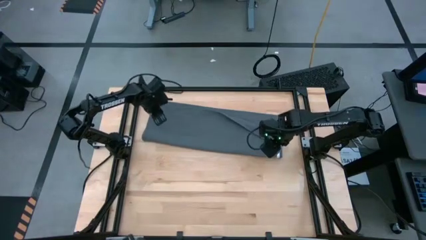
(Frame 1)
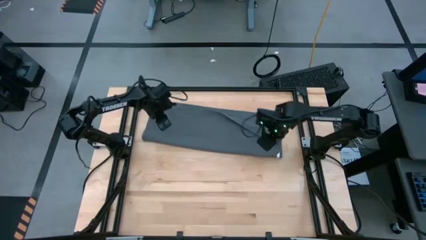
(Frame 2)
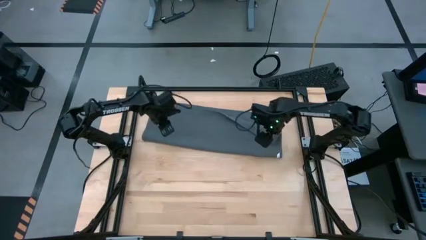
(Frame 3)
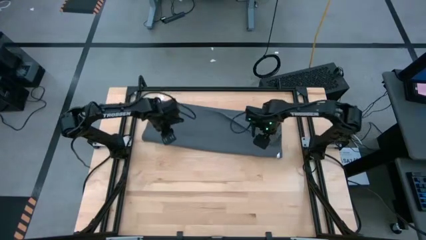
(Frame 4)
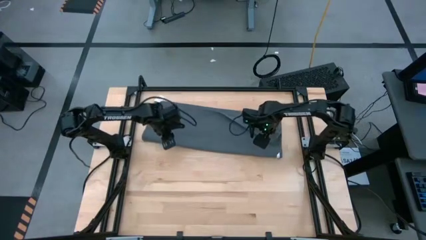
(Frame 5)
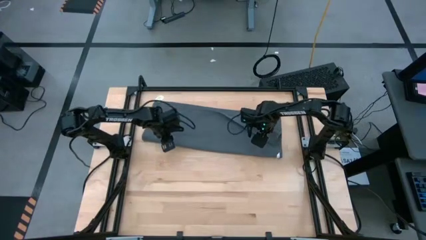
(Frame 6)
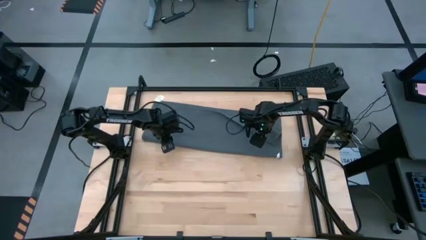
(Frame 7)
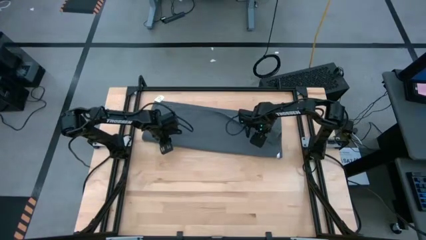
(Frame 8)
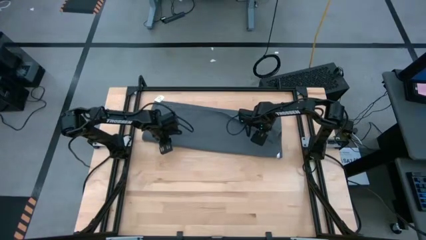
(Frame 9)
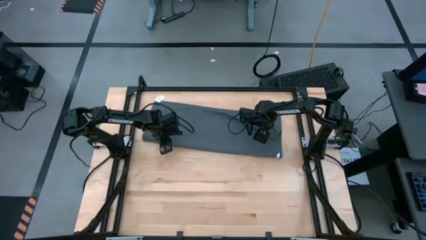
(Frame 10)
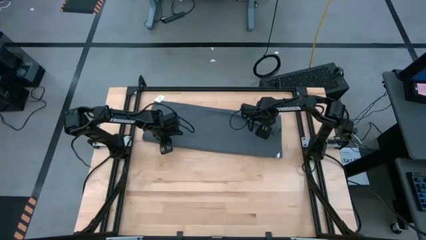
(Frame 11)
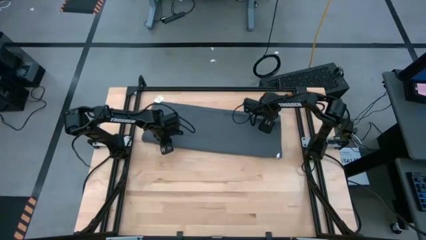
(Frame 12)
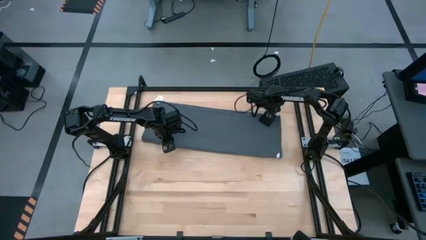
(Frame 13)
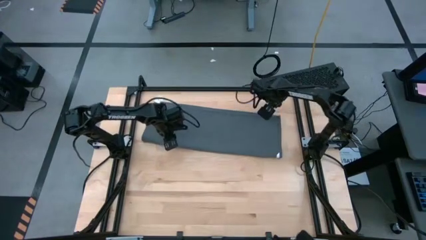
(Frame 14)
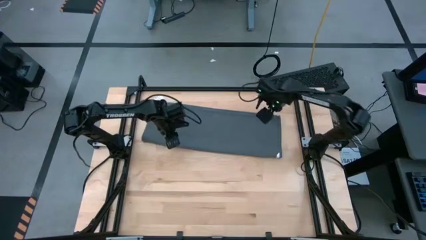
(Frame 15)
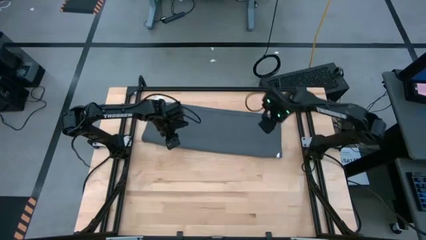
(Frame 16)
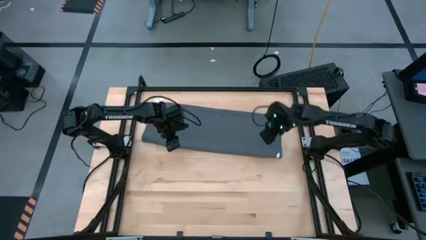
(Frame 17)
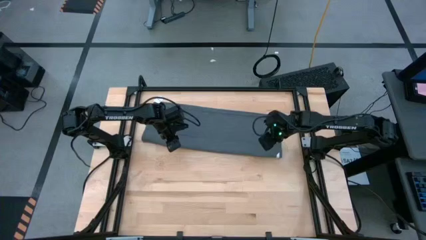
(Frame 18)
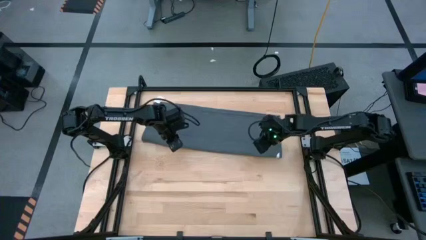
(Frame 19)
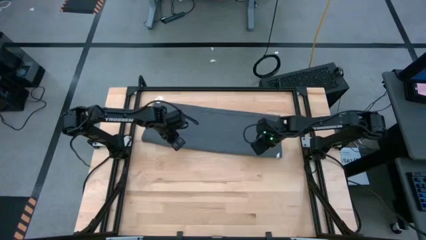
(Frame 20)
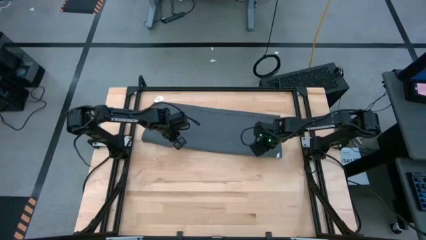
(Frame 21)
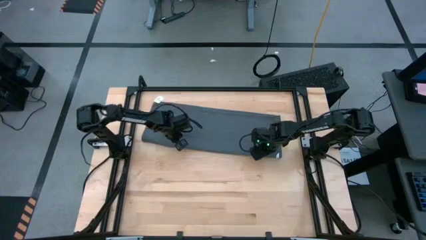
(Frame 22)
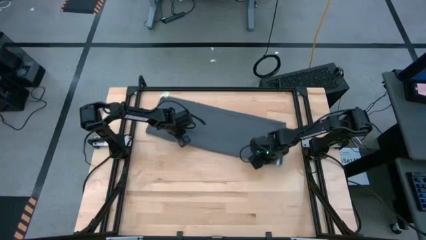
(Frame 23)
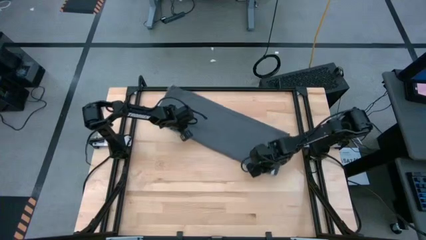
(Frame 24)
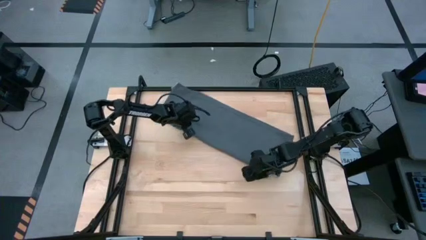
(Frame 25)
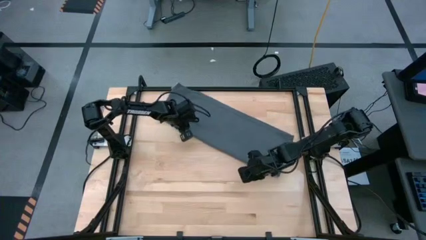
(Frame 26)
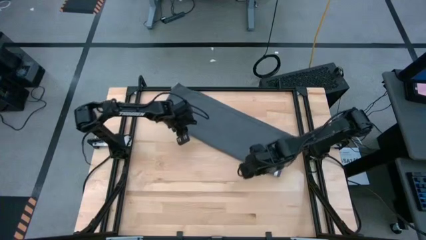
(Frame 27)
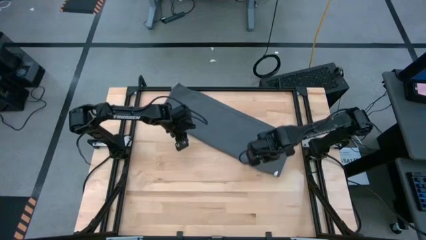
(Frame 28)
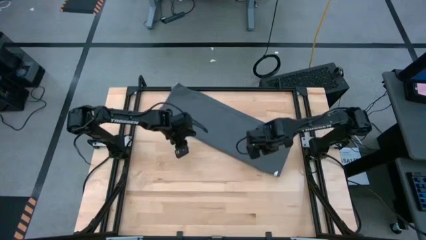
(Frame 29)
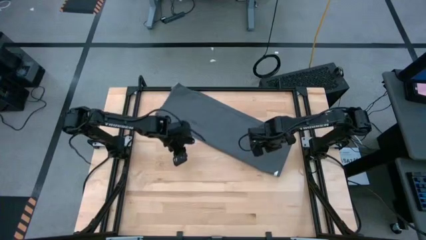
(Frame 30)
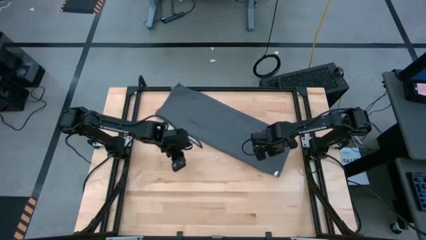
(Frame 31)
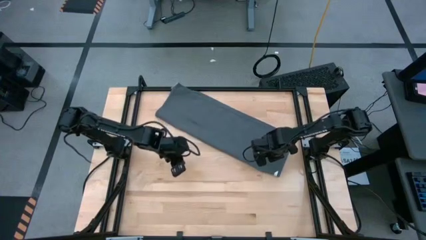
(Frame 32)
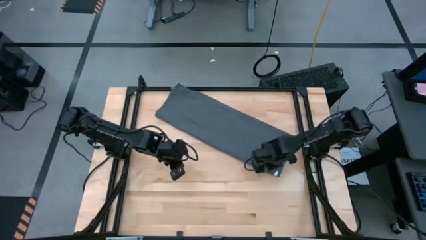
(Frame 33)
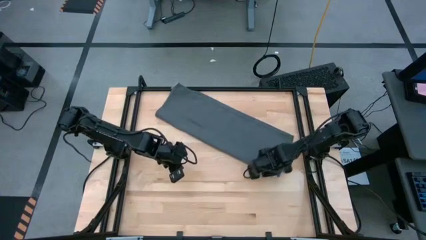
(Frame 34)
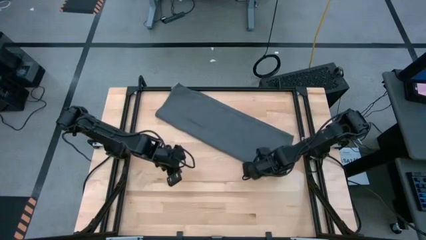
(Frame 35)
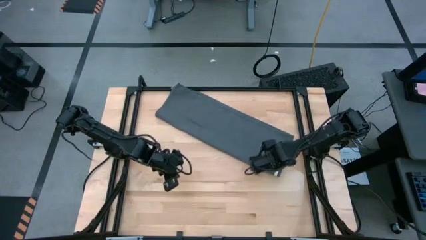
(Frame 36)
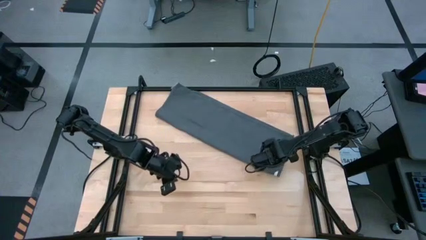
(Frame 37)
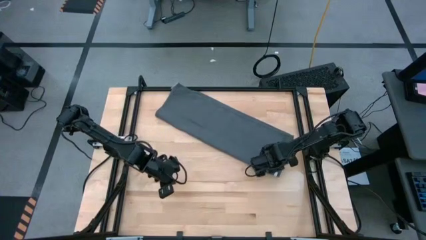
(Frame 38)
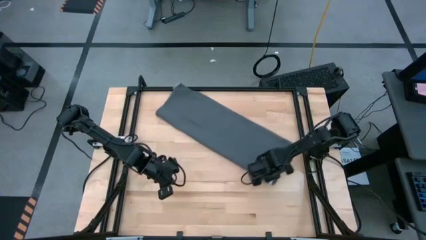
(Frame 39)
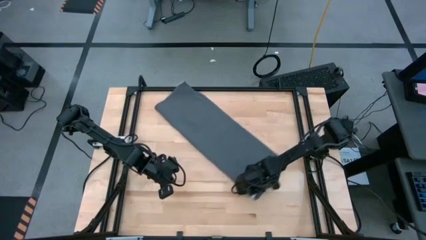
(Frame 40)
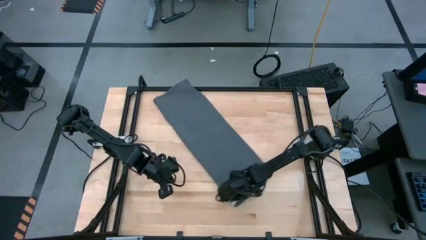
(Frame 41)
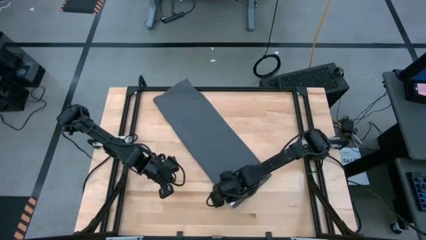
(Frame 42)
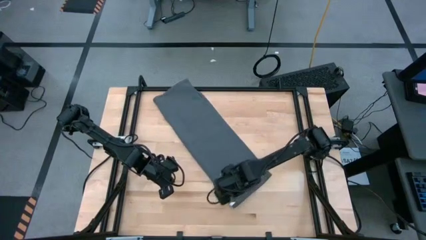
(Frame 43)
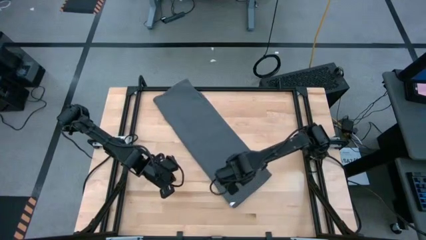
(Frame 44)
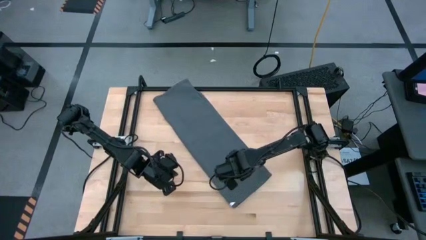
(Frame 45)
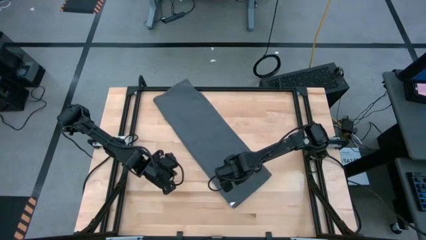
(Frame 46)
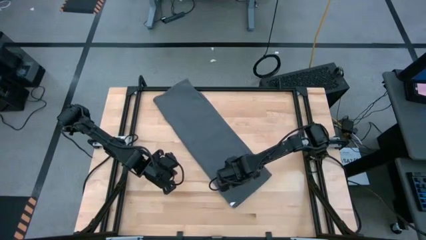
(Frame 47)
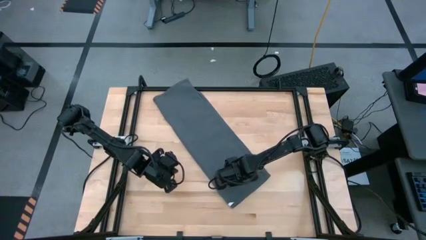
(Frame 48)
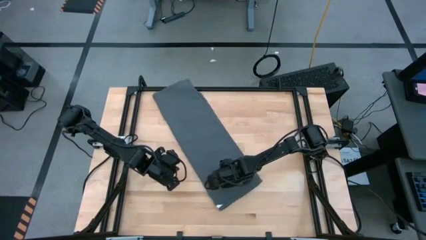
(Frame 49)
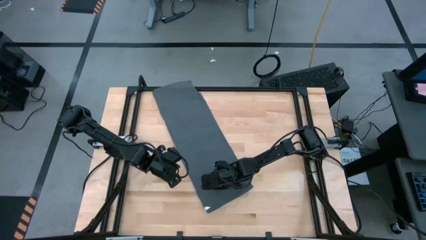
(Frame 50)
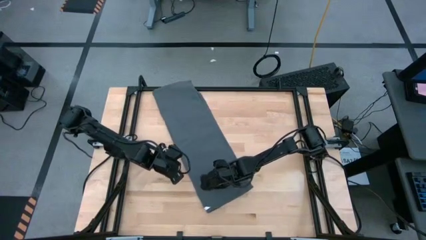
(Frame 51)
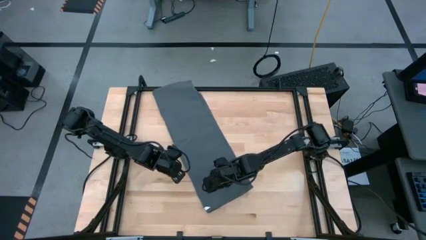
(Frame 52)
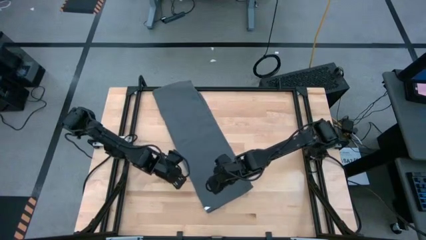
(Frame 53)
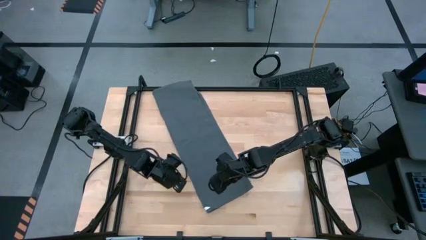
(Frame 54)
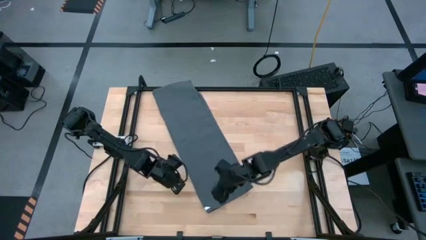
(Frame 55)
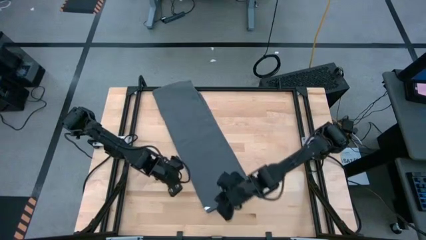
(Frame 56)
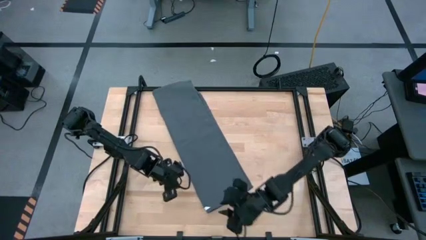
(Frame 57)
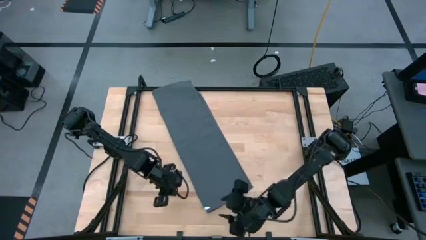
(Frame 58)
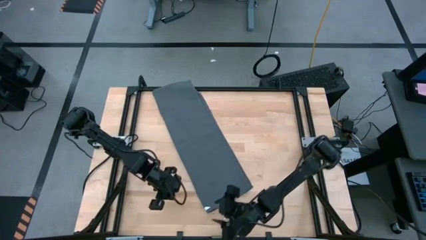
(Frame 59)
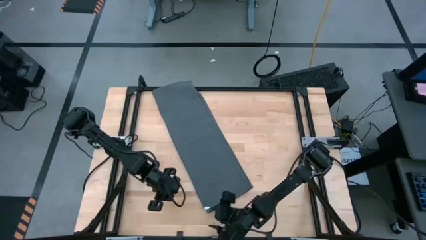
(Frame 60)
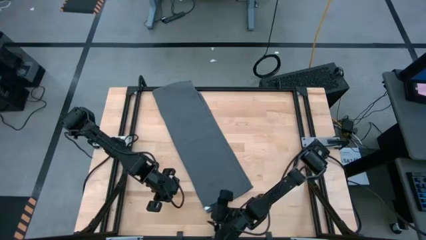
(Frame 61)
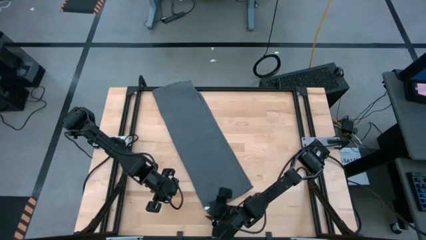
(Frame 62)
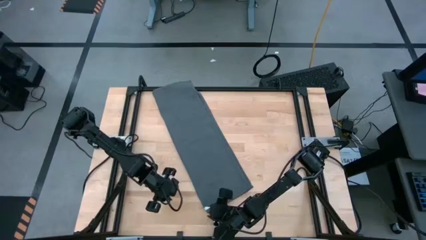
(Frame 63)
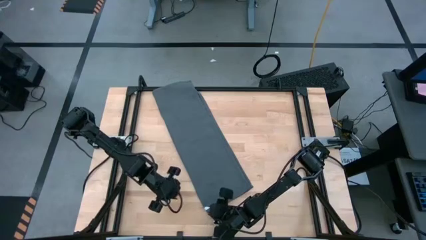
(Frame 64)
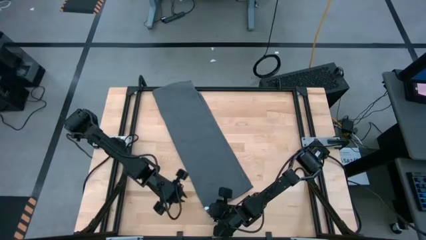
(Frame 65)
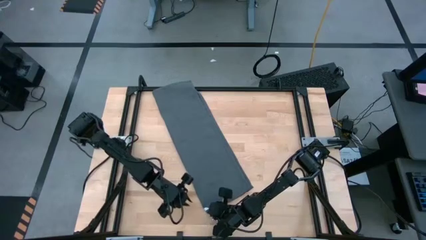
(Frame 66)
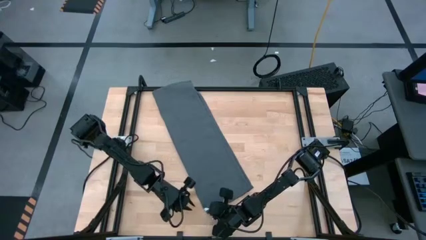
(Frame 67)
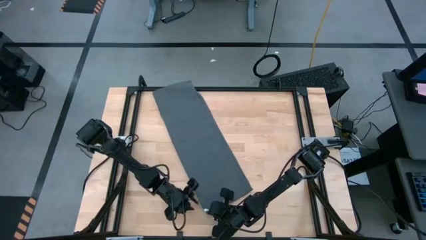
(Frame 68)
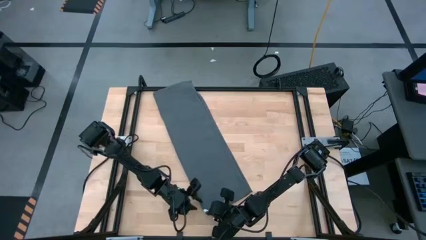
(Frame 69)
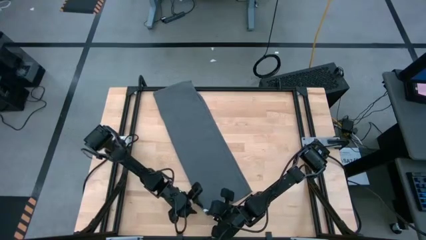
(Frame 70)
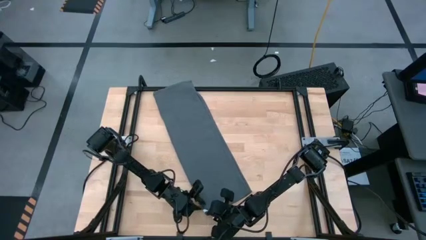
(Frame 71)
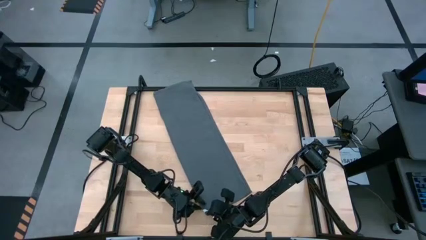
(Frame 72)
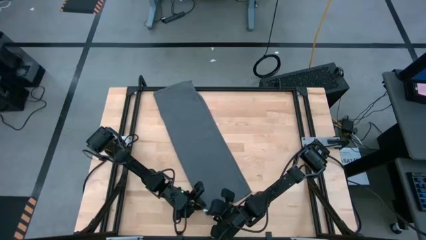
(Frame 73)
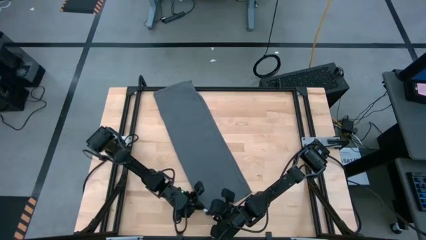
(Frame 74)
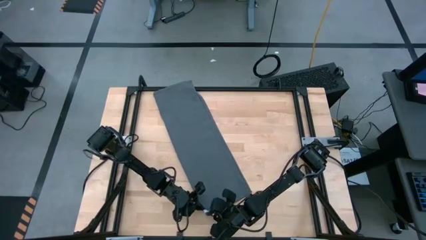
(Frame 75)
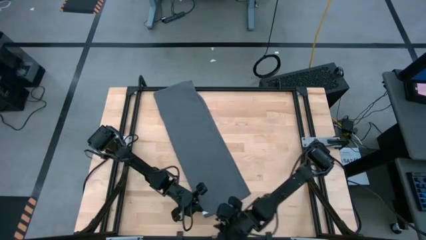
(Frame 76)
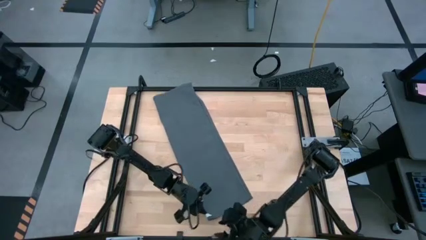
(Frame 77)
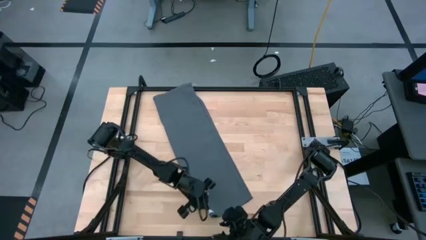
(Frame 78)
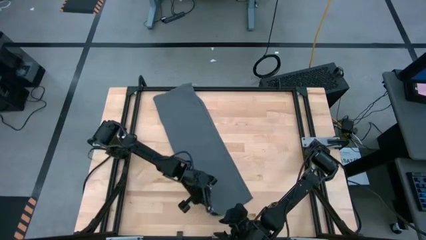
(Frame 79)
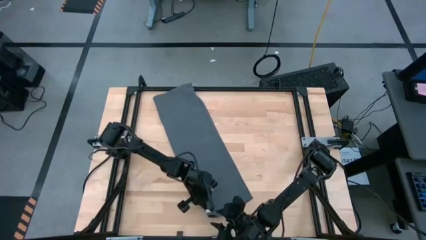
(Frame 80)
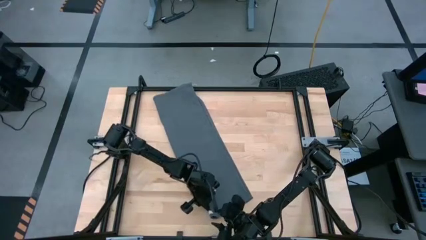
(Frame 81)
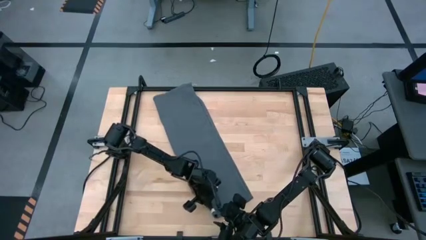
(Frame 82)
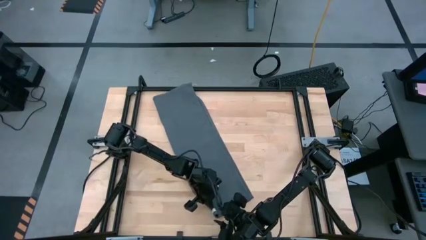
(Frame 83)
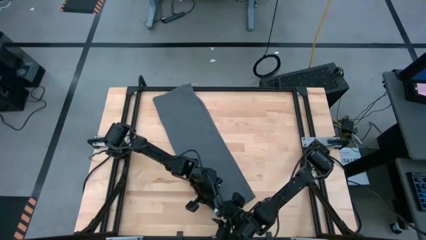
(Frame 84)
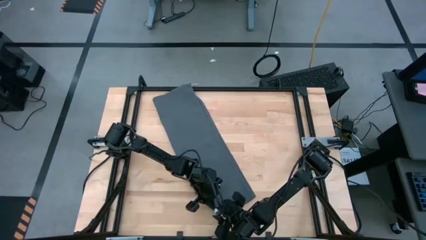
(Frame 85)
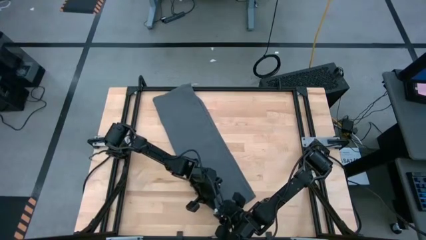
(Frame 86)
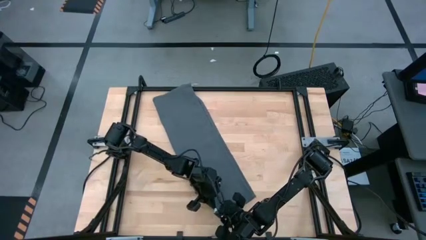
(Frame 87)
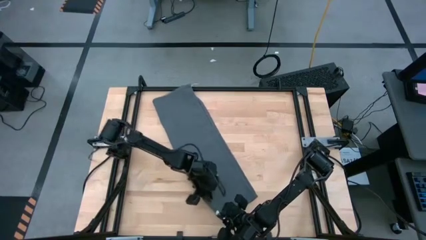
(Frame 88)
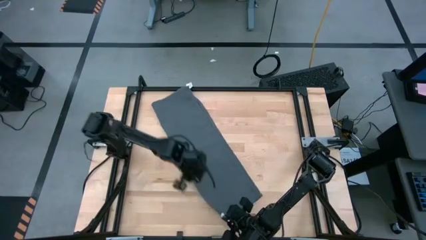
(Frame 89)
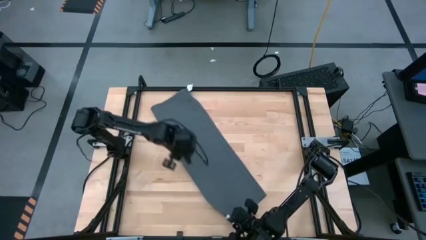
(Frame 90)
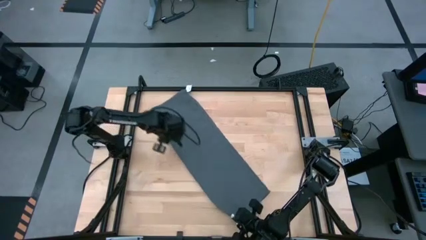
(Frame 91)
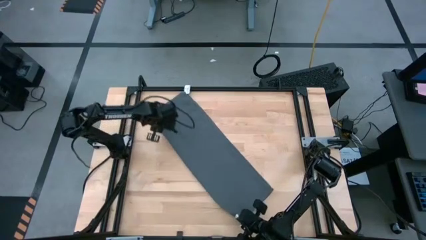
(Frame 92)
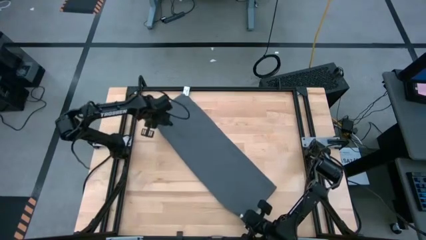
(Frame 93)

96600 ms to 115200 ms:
Task: Roll towel into tight, uniform cylinder
Roll the towel
